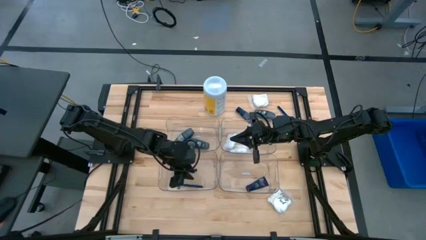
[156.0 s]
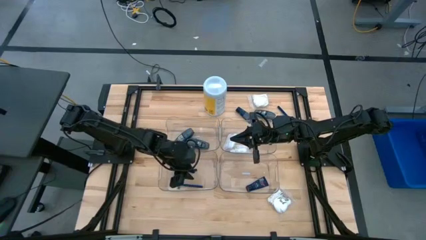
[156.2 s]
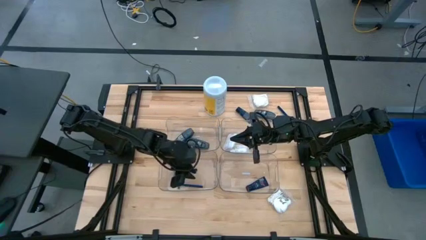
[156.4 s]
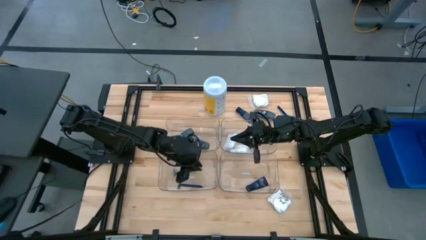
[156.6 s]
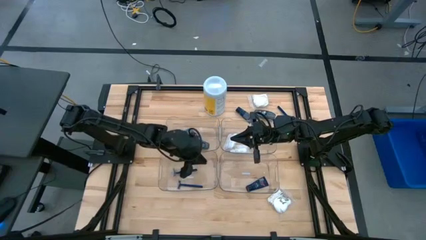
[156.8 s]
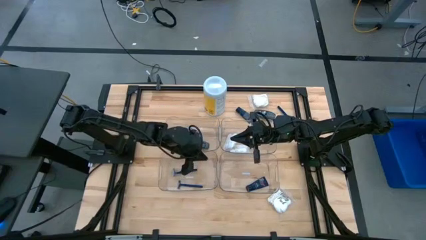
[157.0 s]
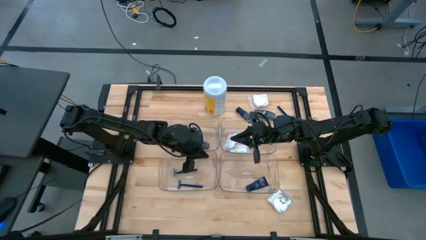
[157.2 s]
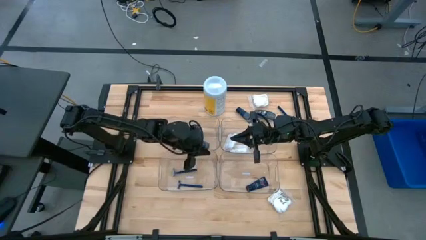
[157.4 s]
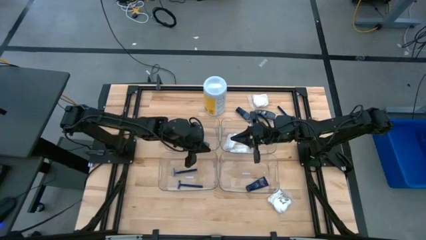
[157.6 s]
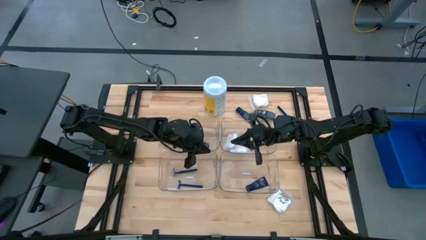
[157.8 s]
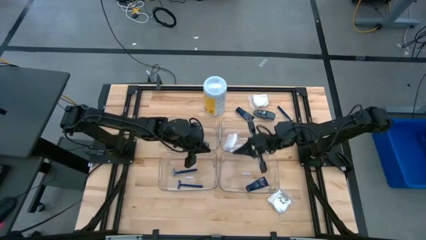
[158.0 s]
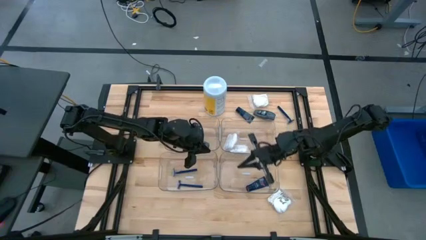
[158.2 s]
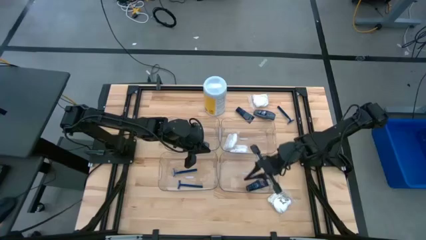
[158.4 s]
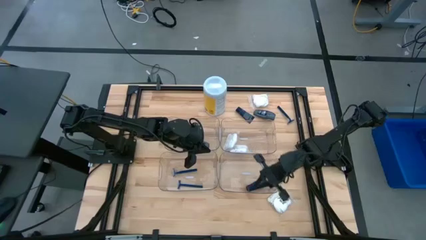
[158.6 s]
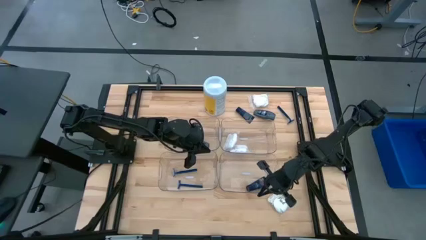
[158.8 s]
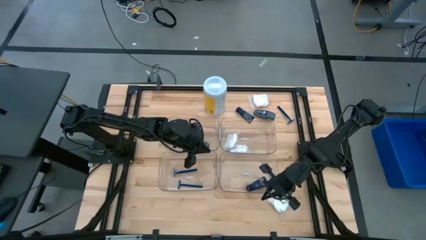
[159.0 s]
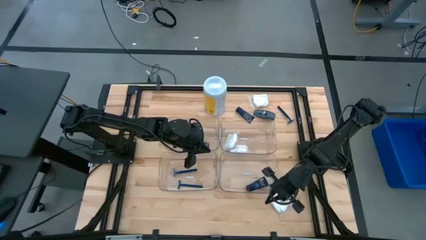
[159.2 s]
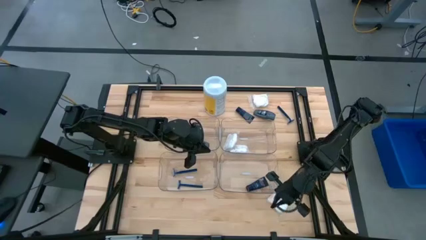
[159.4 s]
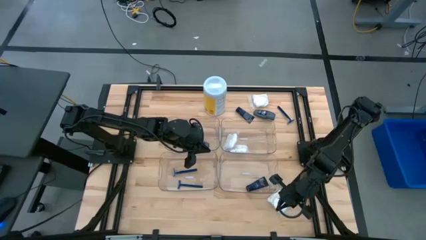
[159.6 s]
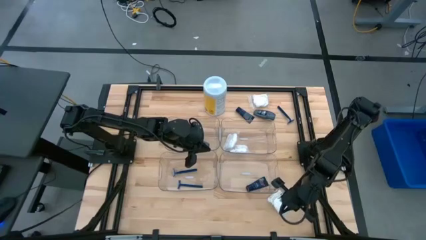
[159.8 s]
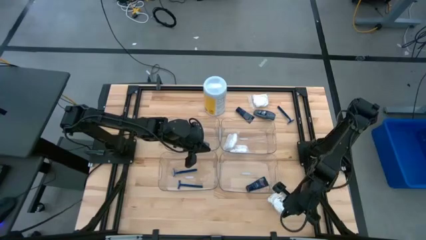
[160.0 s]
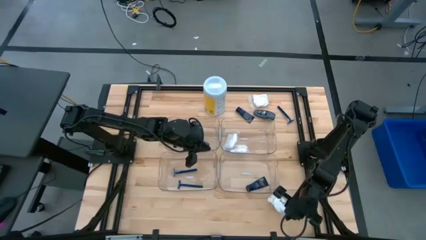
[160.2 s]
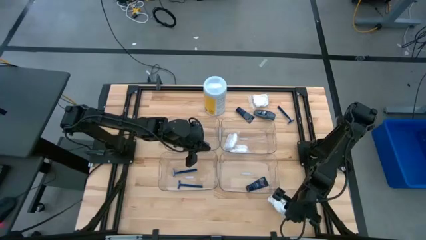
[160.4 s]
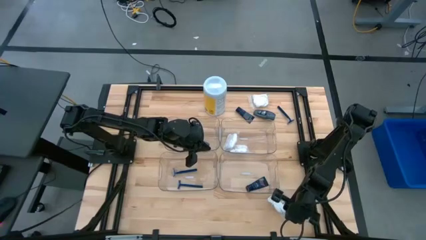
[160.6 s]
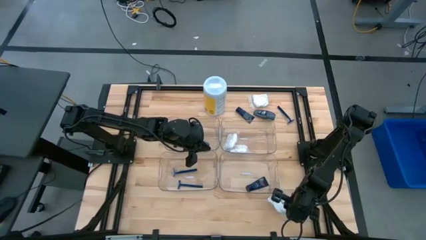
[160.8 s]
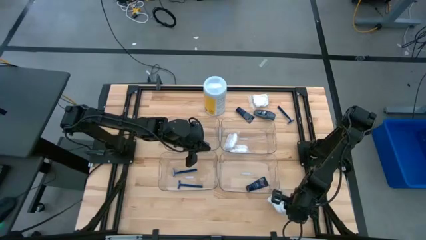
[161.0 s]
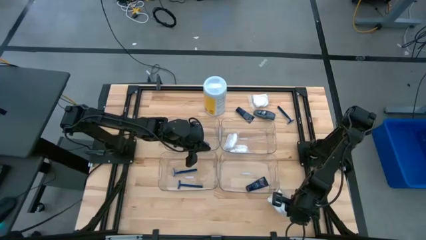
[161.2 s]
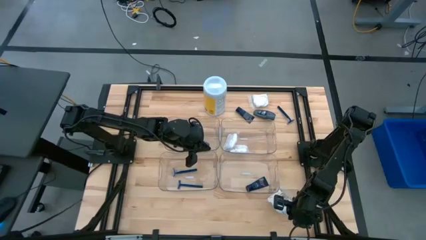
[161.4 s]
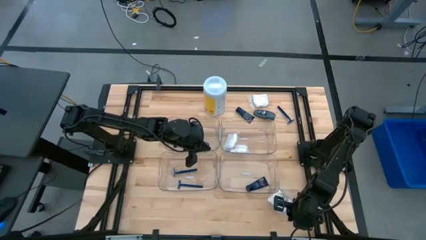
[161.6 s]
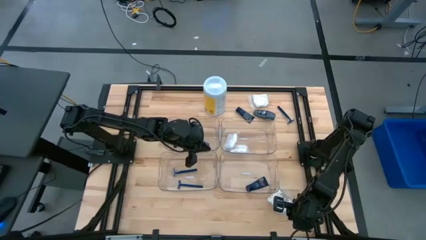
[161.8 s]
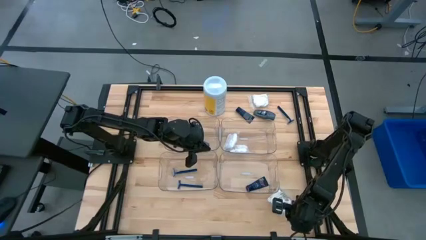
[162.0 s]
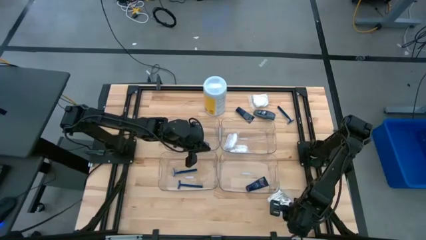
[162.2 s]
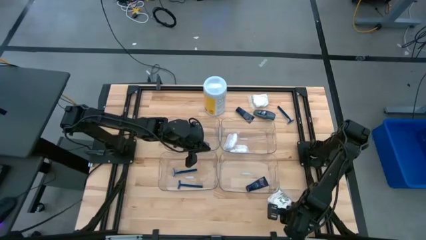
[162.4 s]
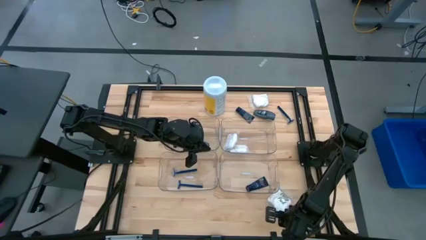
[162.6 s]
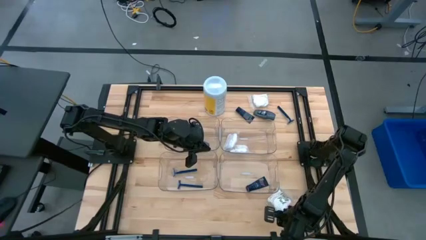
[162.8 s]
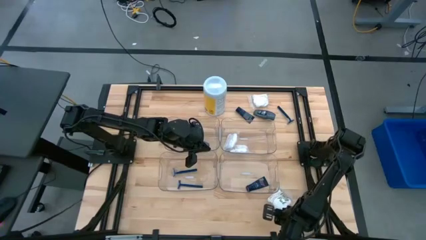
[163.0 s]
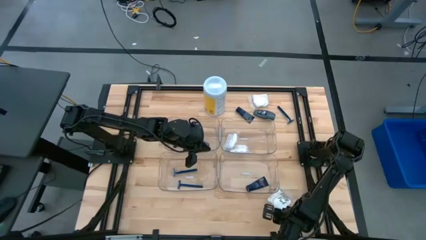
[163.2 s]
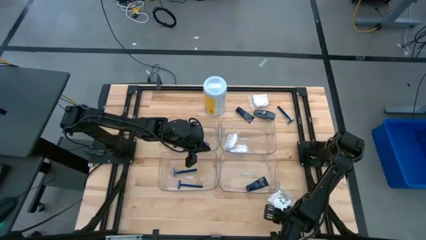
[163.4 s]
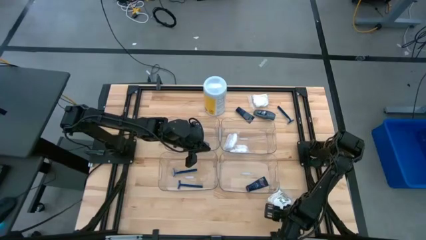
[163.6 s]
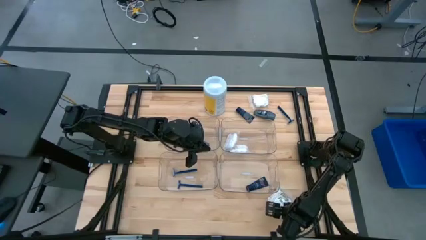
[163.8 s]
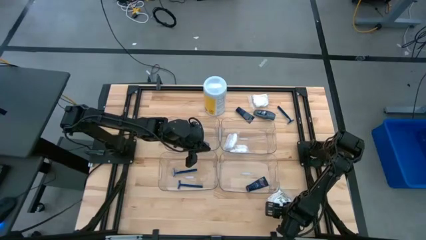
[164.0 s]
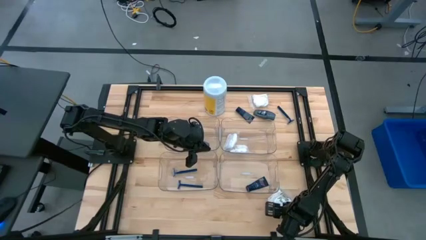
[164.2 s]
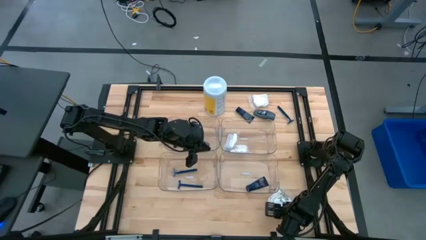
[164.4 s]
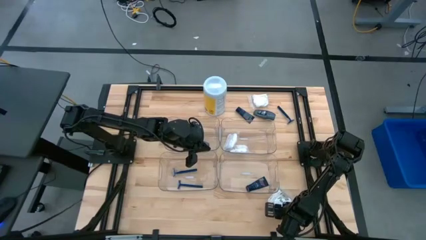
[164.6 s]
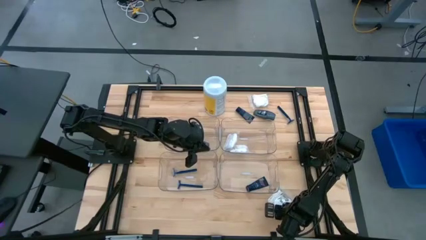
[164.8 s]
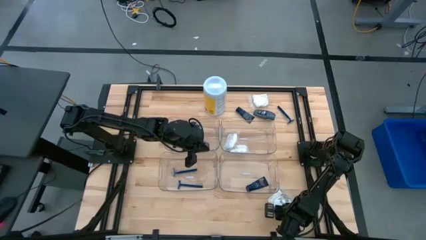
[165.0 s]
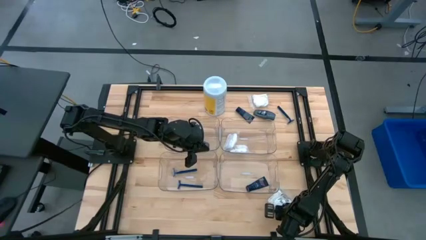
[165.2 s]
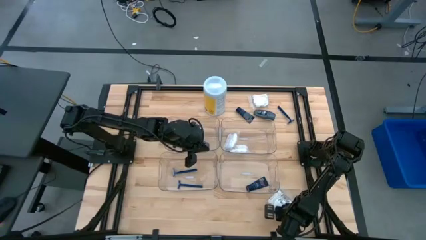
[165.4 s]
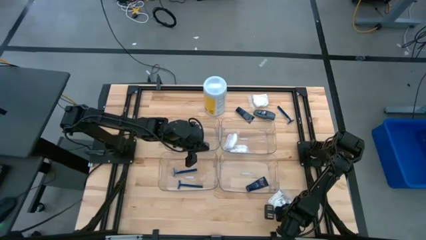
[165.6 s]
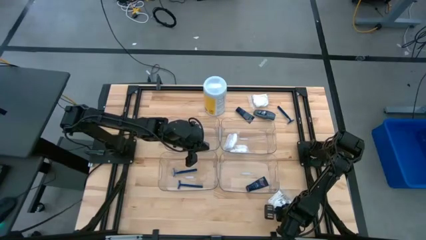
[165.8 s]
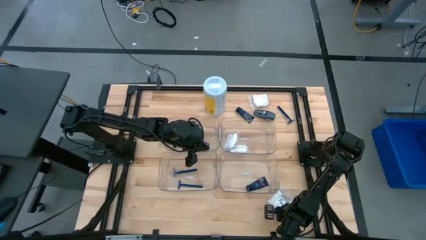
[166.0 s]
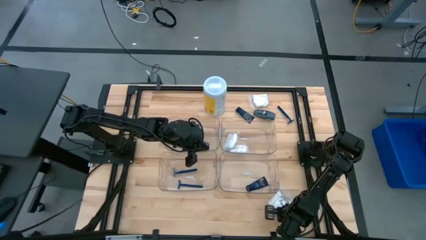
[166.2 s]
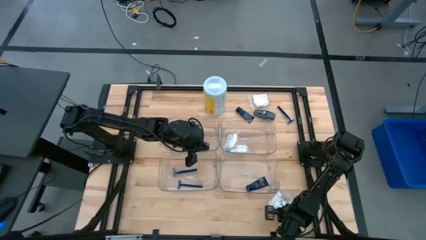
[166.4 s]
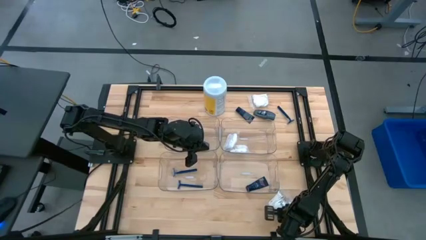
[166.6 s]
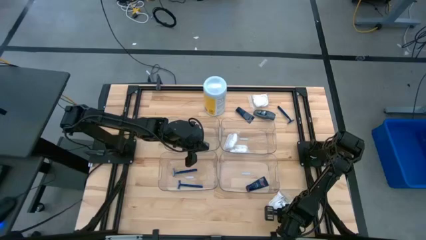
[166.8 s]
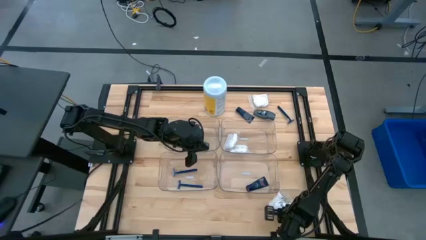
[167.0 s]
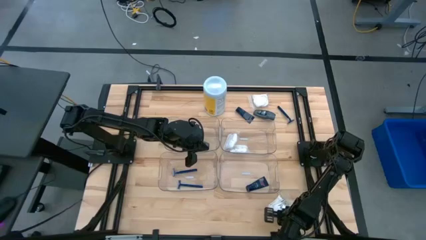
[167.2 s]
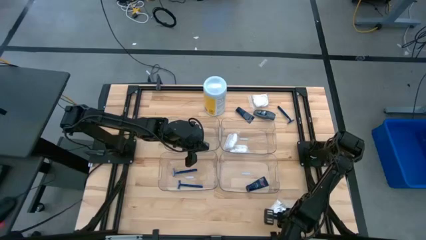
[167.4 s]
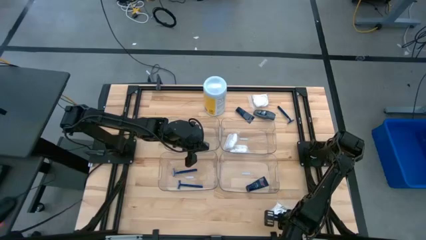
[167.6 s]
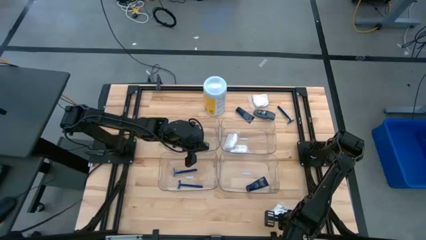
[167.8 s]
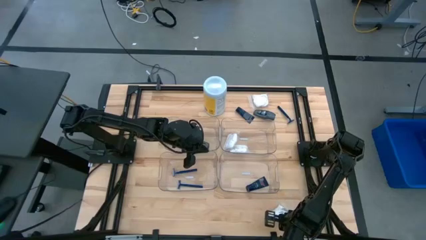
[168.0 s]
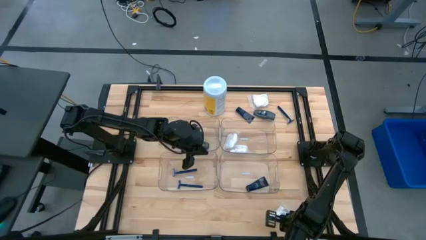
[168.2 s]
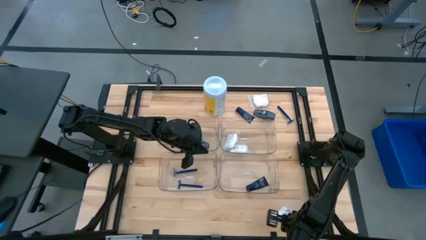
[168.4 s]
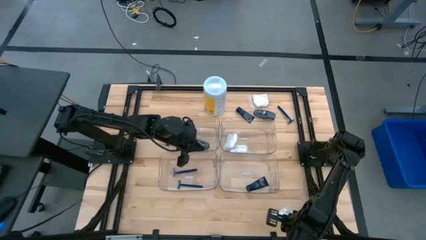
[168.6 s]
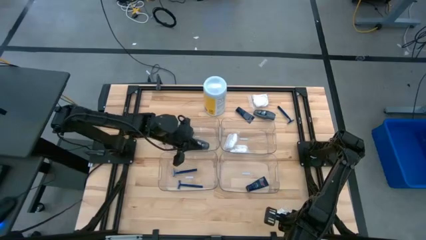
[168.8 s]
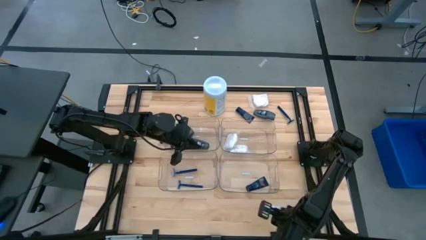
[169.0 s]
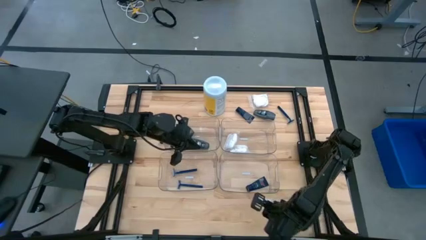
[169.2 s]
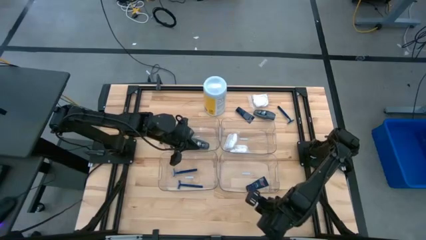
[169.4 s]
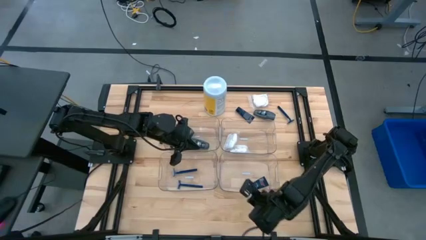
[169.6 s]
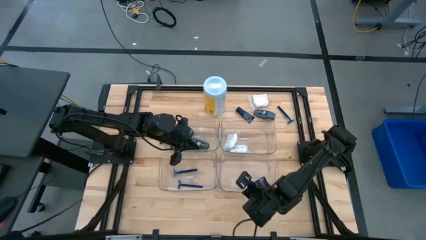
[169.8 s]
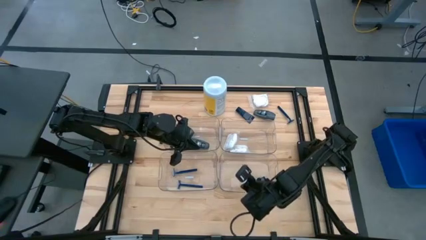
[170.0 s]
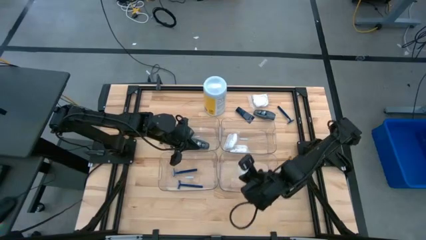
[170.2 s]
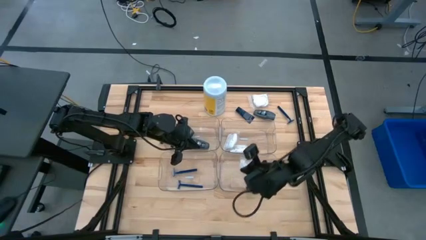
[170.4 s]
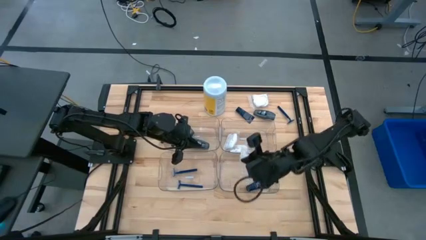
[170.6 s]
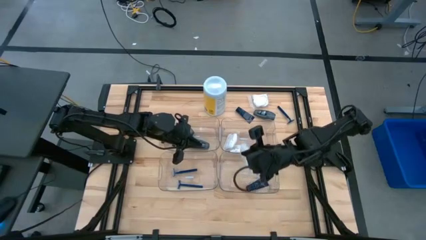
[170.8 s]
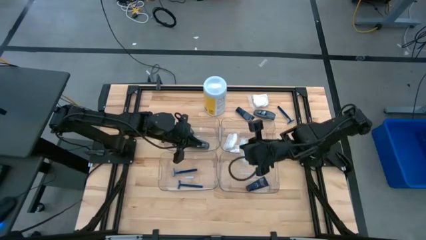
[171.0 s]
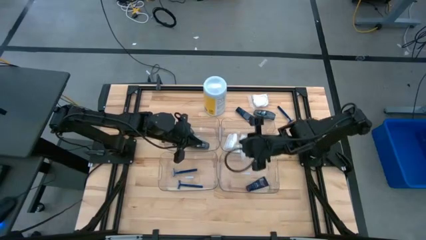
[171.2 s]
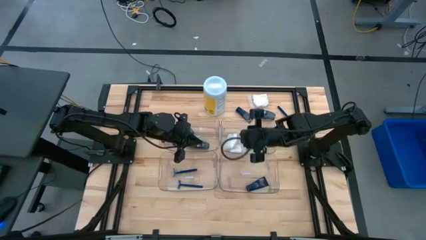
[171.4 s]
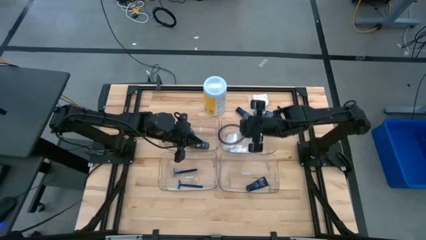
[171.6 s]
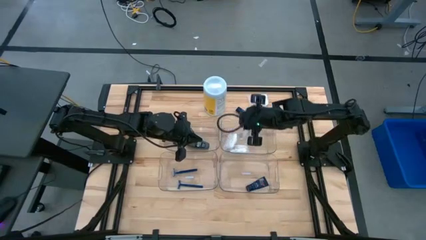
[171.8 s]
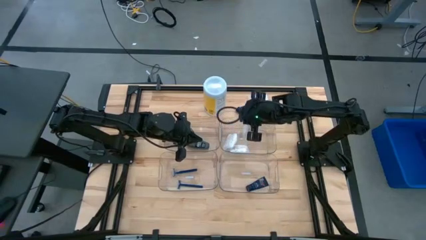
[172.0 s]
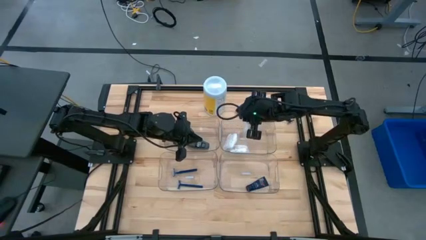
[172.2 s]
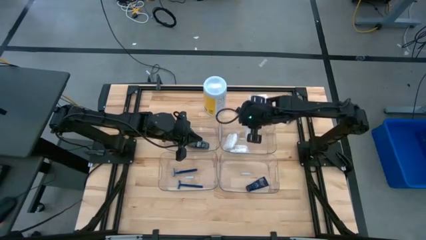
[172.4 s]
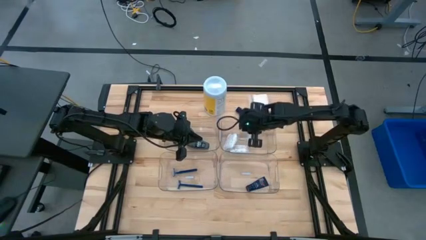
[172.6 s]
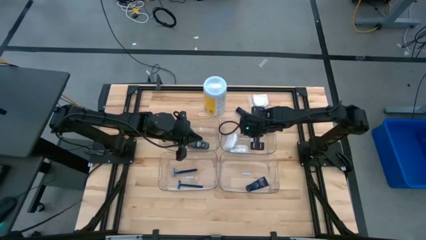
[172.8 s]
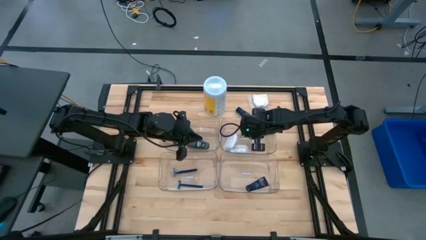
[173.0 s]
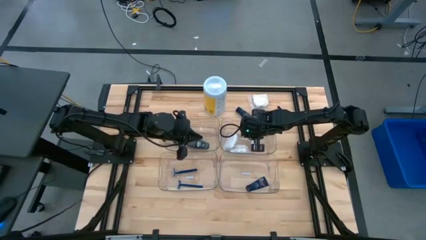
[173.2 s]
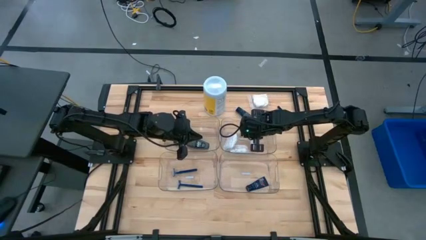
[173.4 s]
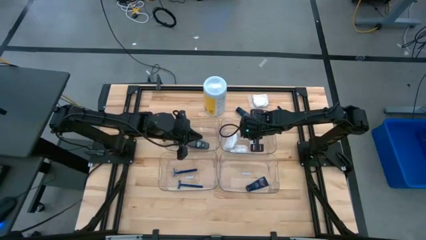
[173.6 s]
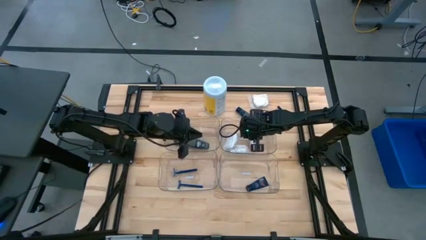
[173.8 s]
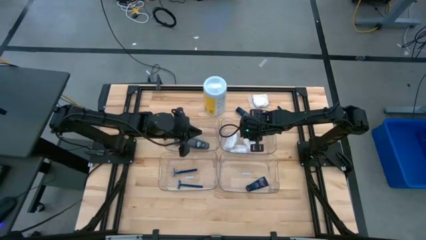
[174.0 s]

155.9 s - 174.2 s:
Task: Pick & Place Travel size toiletries
Put the transparent vanity pack into the top right transparent bin
